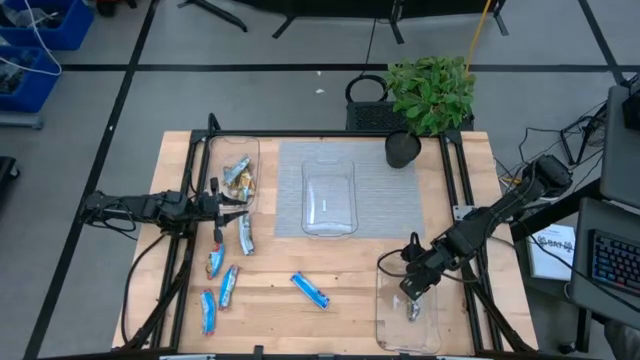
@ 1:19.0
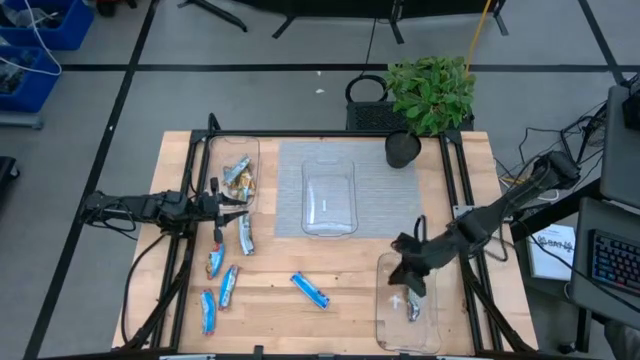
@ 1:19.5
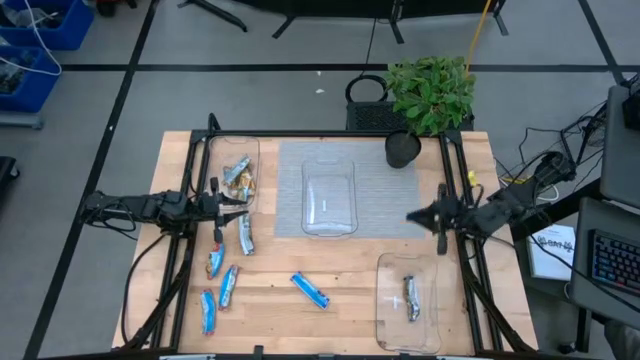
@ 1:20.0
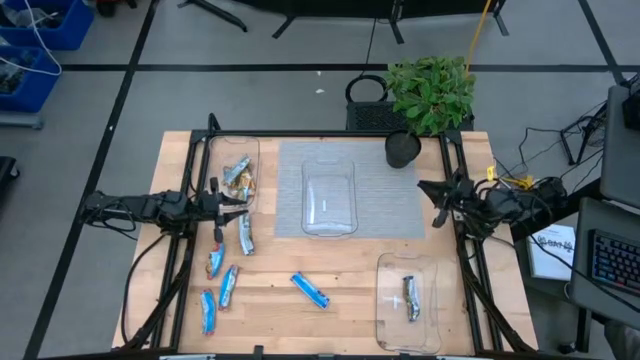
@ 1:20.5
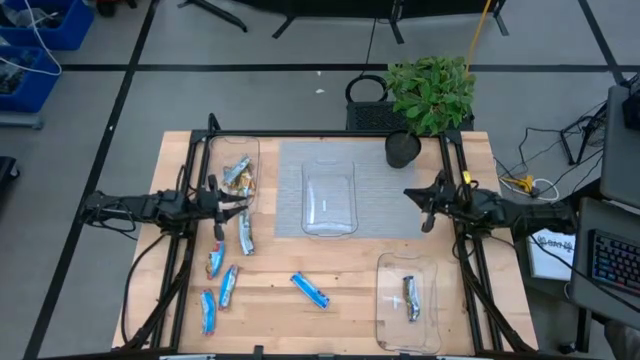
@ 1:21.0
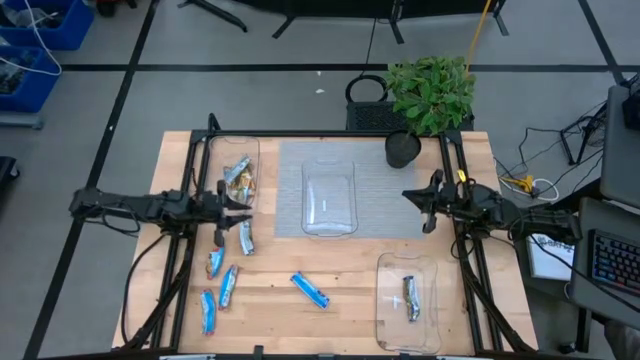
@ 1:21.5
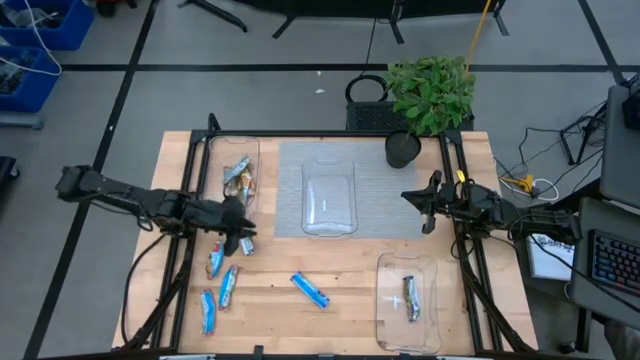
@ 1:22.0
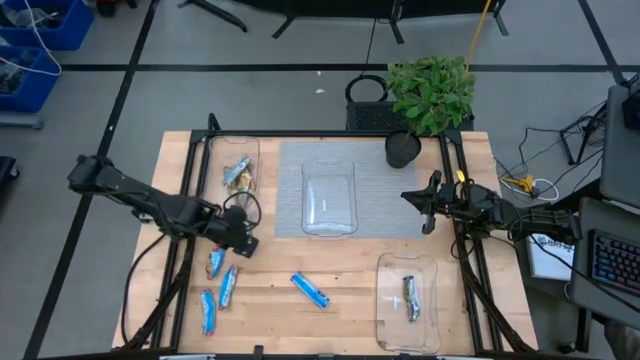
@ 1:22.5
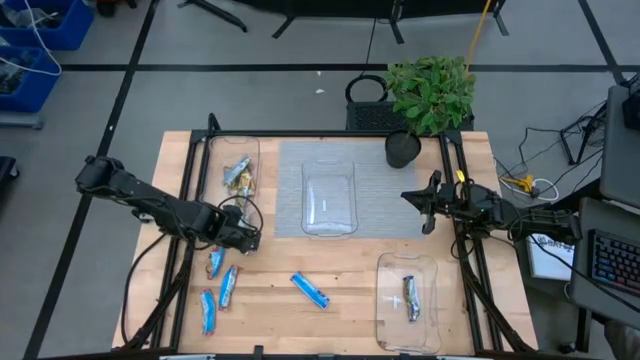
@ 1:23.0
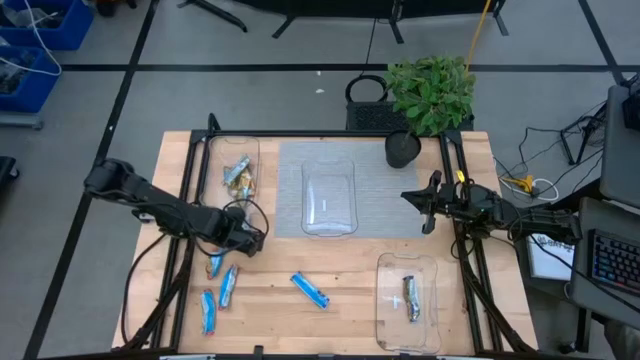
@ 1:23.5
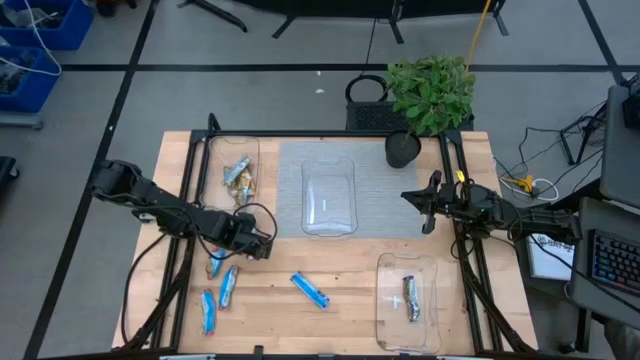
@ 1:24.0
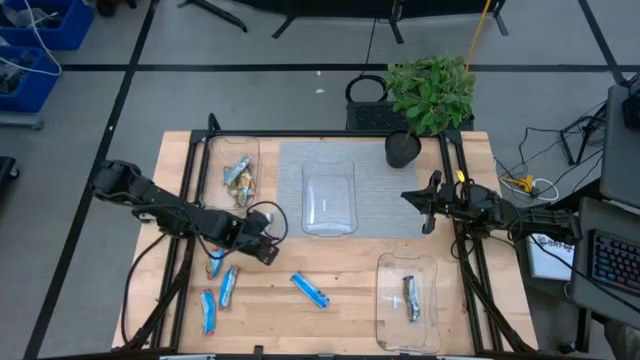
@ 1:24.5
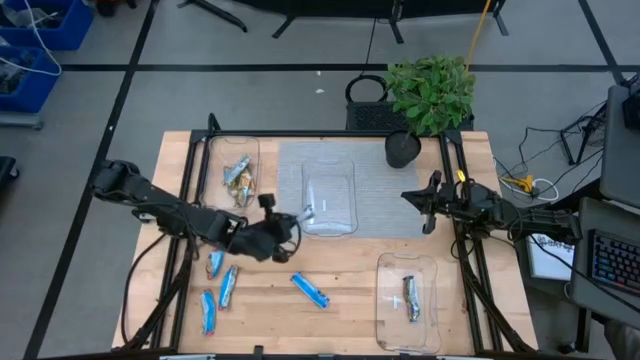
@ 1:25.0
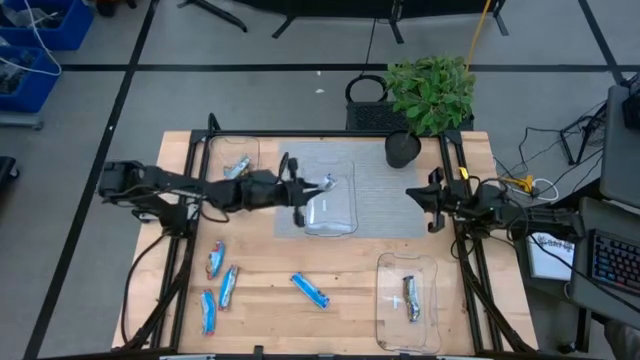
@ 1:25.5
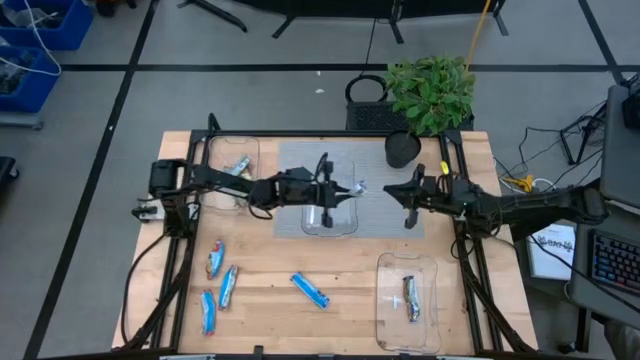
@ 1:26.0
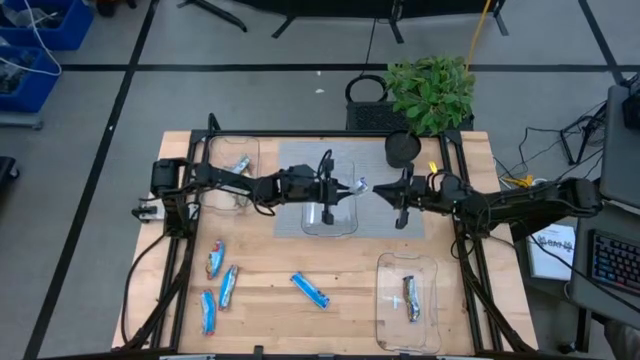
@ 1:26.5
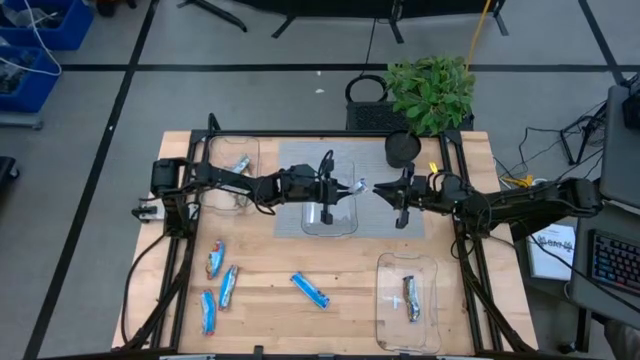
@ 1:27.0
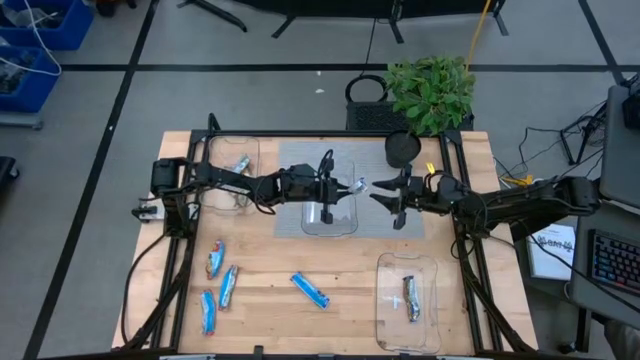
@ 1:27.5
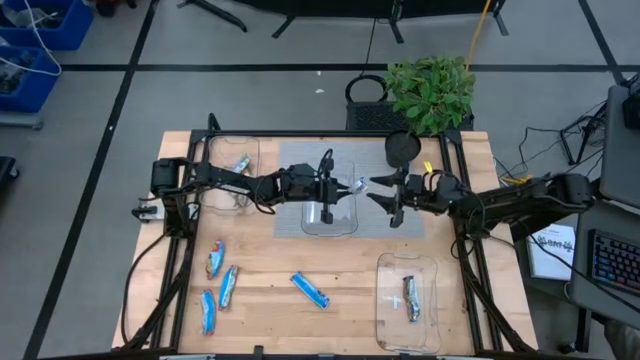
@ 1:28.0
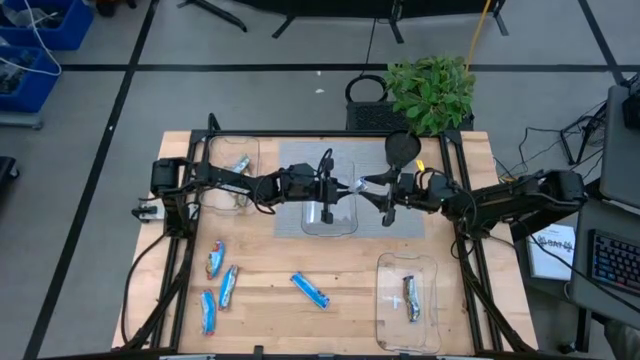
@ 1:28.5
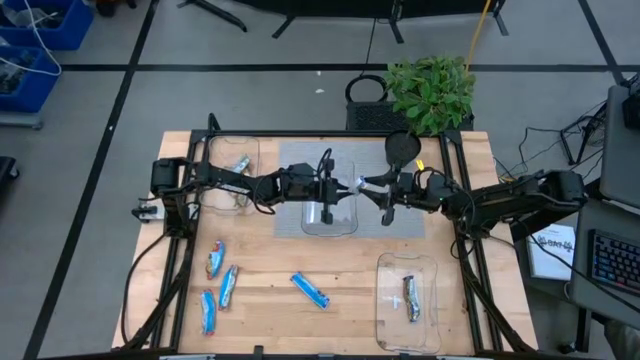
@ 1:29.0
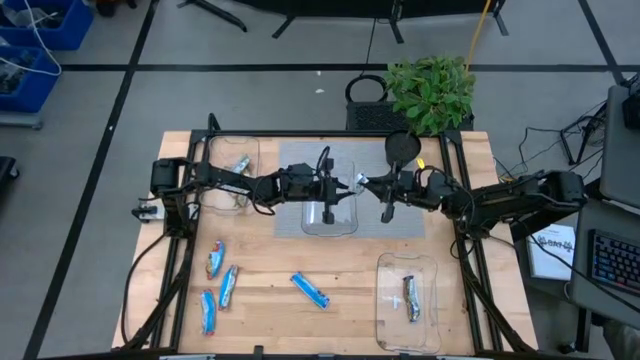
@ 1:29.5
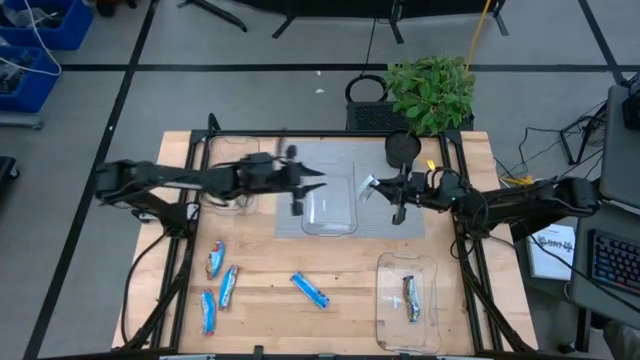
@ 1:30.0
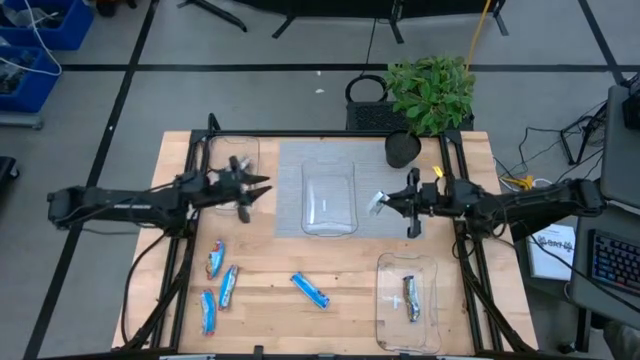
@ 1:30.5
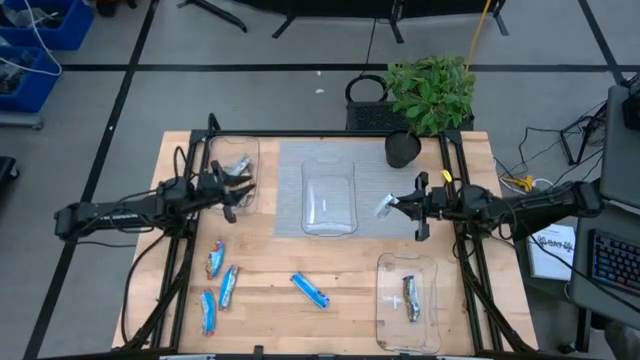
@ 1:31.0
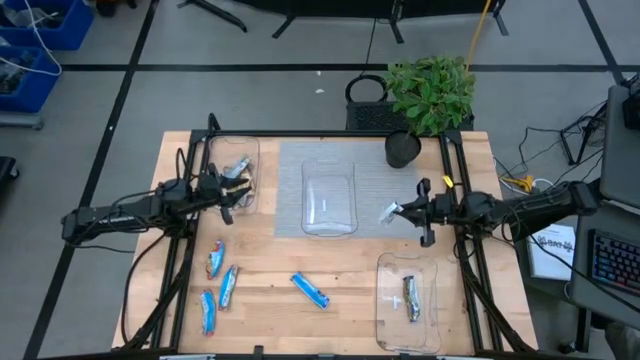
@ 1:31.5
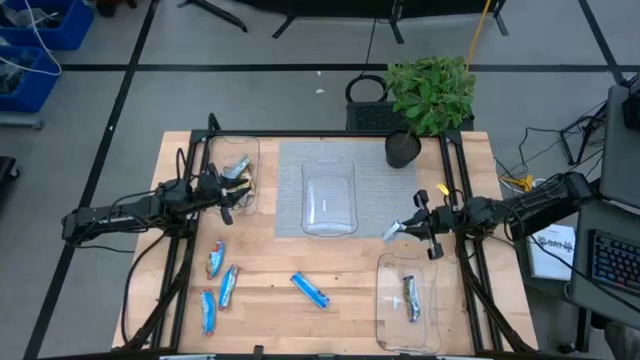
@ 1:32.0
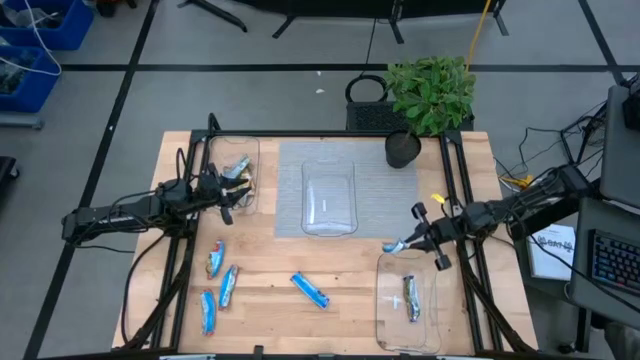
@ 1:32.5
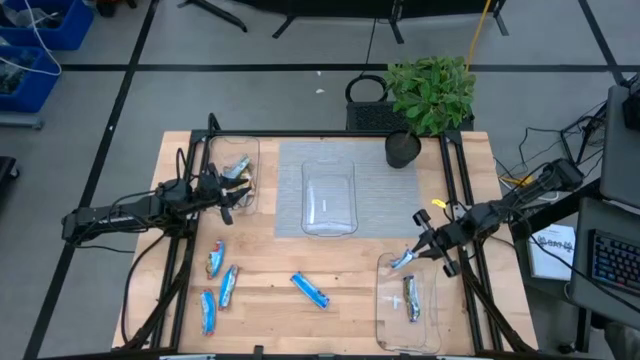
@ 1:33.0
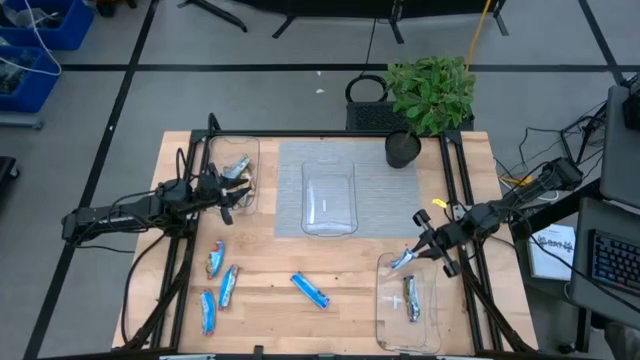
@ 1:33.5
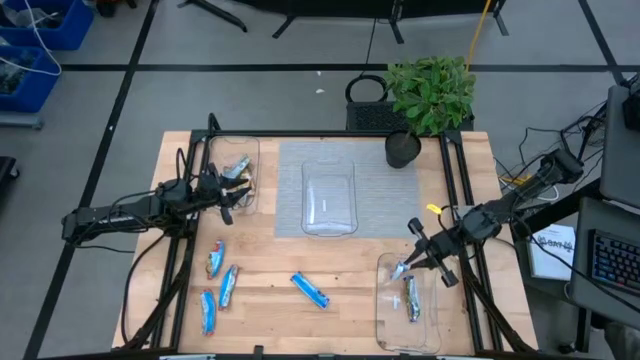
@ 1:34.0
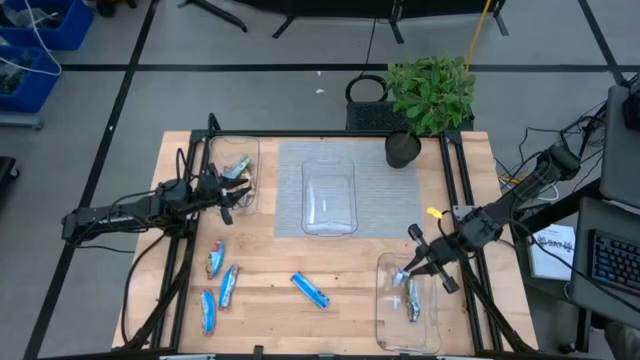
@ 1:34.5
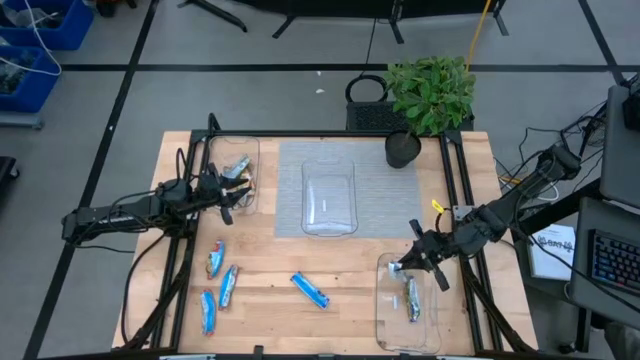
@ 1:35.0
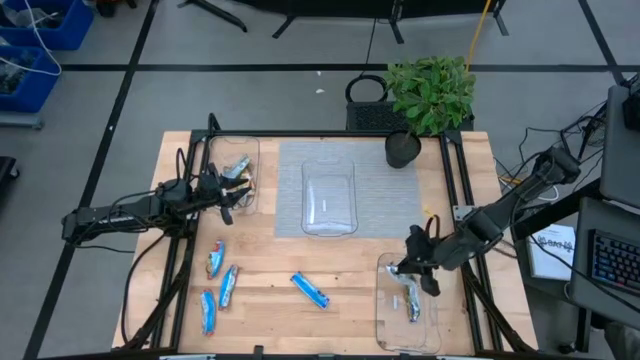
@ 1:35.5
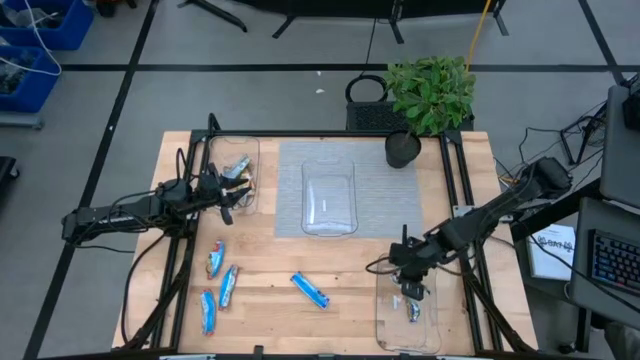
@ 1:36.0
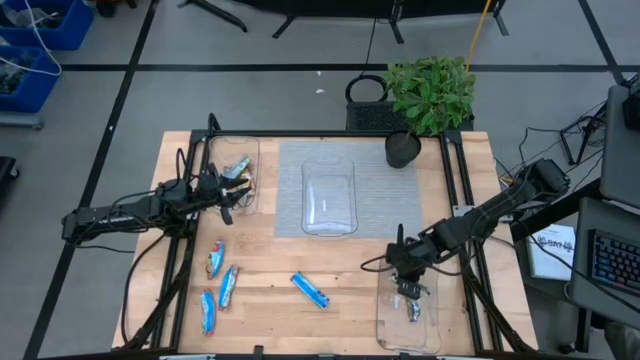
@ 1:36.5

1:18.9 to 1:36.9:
Task: Pick and place Granola Bars by type
Put the blue granola bar into the bottom right transparent bin

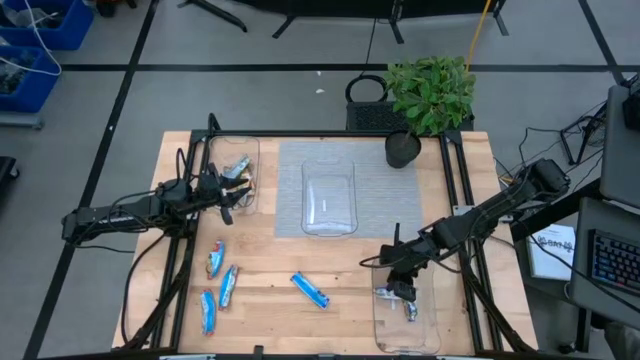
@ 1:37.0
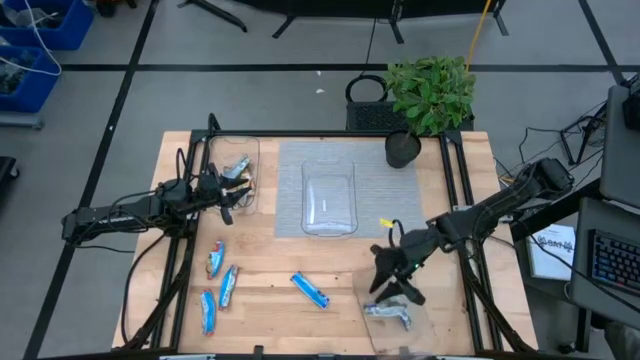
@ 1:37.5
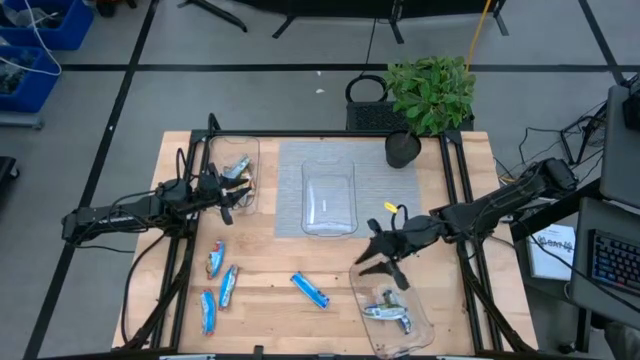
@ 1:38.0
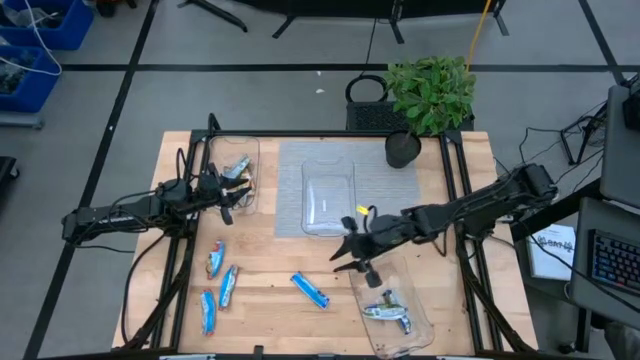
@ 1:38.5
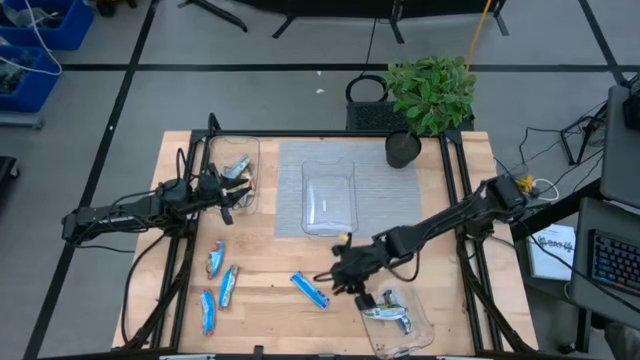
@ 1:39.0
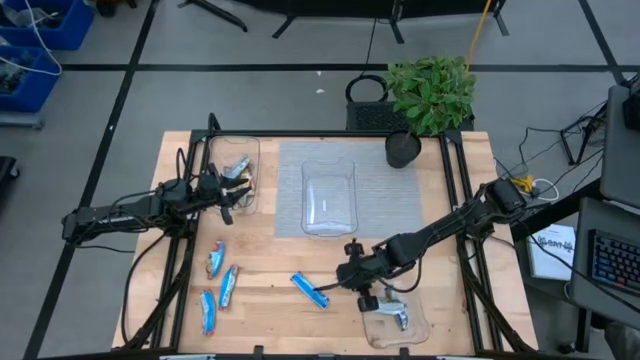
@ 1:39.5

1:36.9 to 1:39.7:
Adjust the bottom right transparent bin
